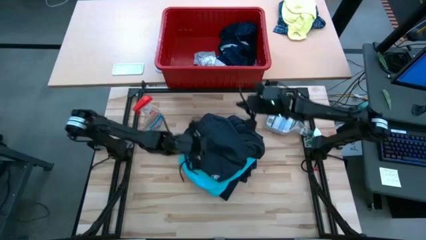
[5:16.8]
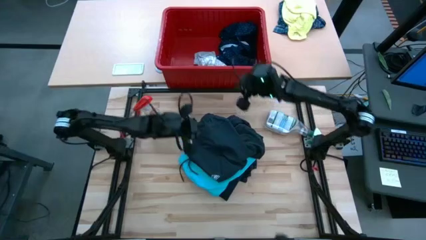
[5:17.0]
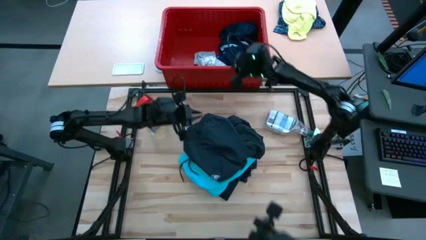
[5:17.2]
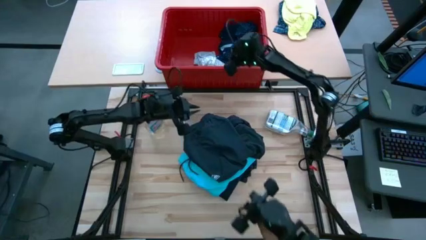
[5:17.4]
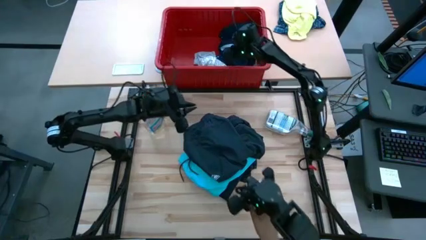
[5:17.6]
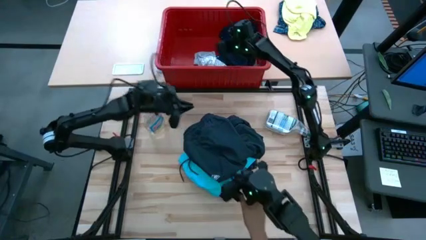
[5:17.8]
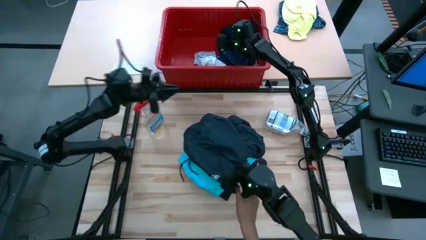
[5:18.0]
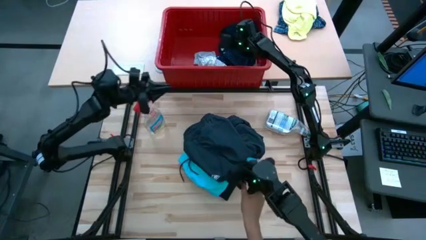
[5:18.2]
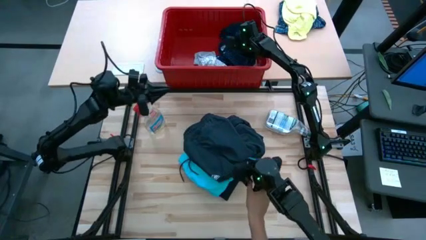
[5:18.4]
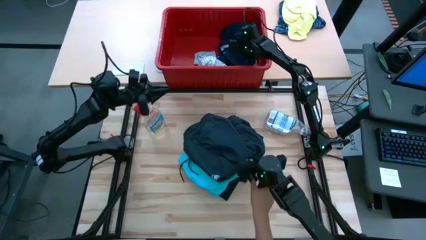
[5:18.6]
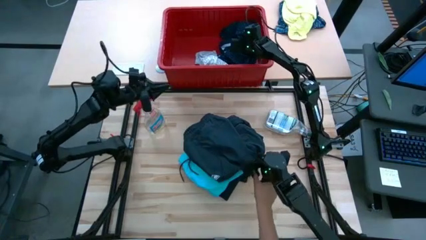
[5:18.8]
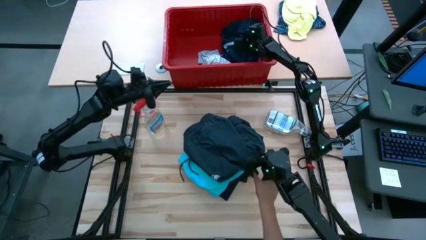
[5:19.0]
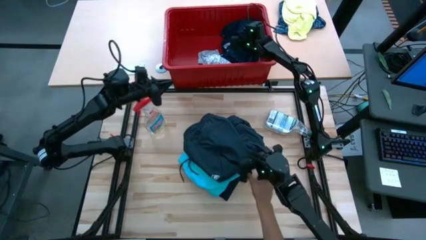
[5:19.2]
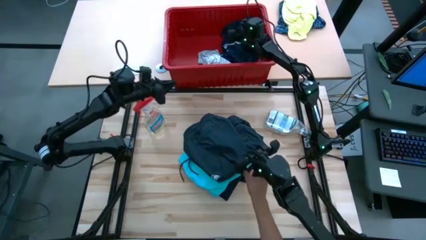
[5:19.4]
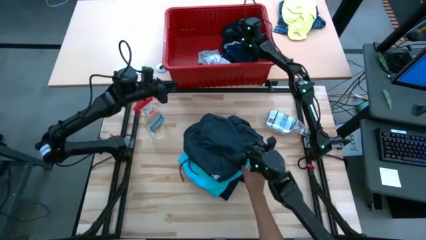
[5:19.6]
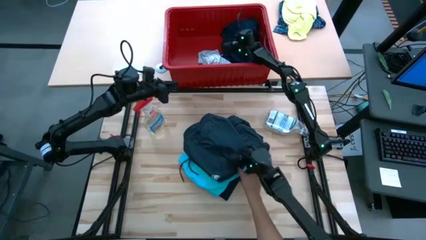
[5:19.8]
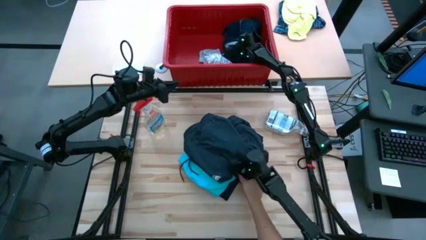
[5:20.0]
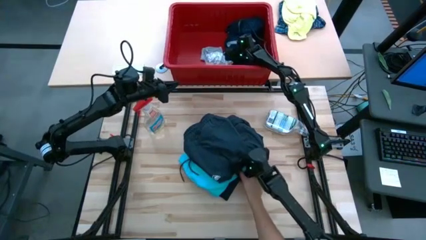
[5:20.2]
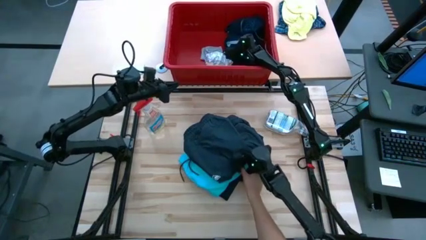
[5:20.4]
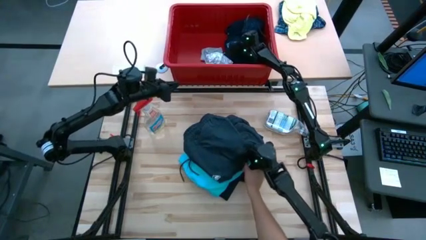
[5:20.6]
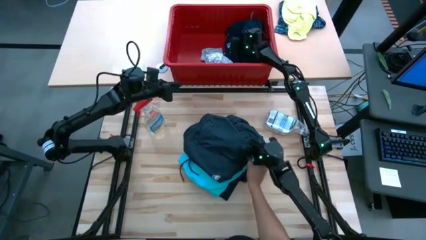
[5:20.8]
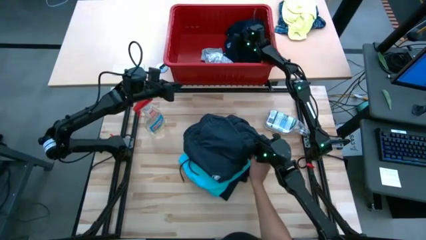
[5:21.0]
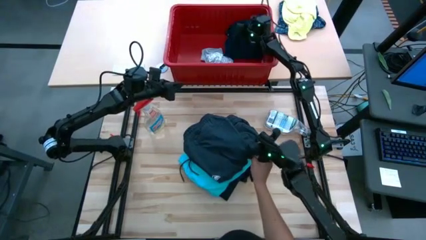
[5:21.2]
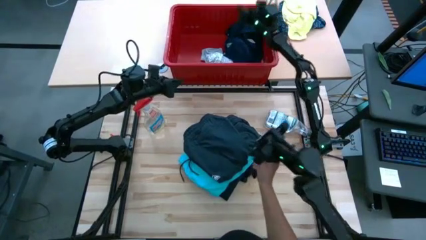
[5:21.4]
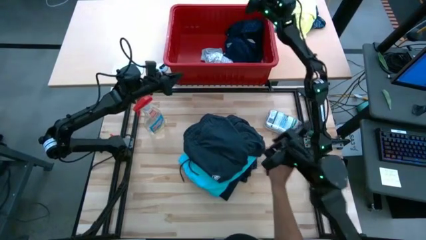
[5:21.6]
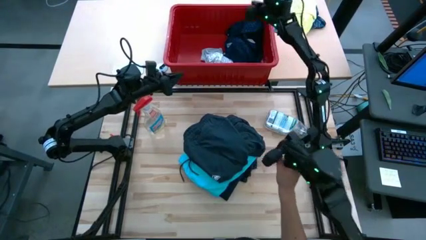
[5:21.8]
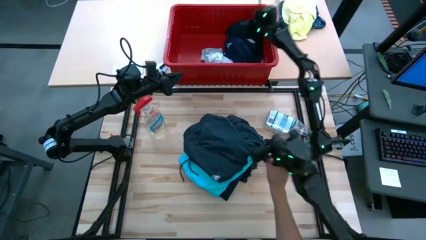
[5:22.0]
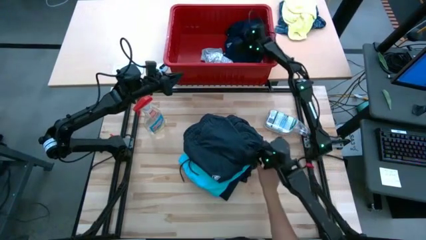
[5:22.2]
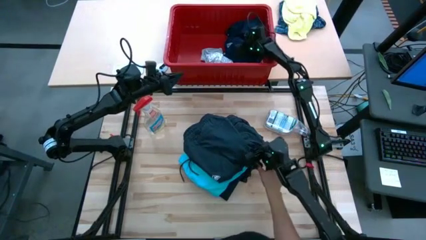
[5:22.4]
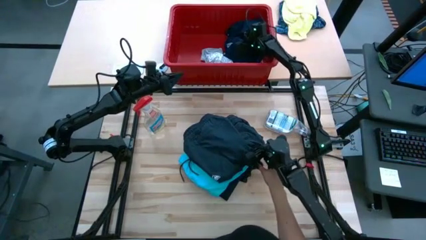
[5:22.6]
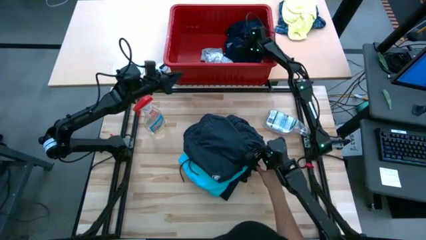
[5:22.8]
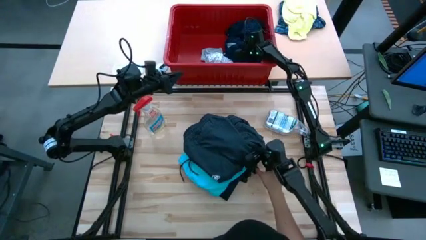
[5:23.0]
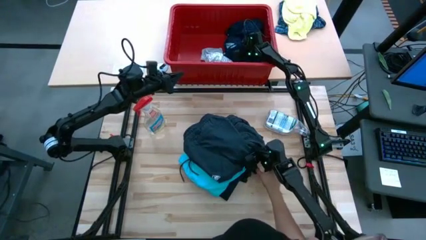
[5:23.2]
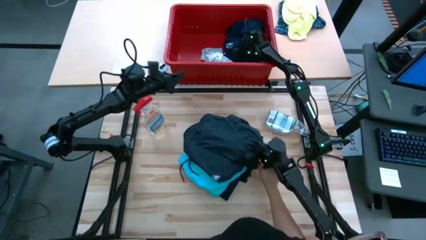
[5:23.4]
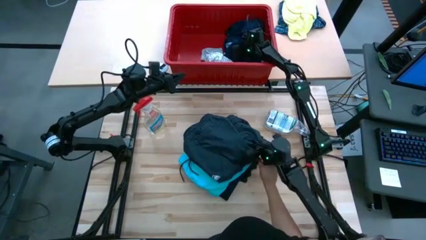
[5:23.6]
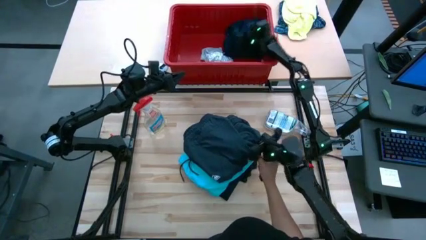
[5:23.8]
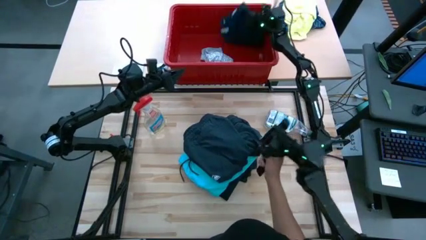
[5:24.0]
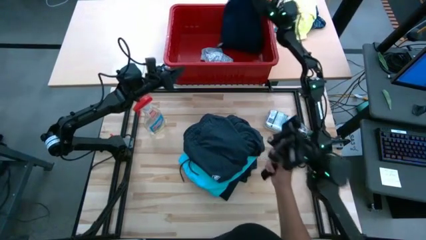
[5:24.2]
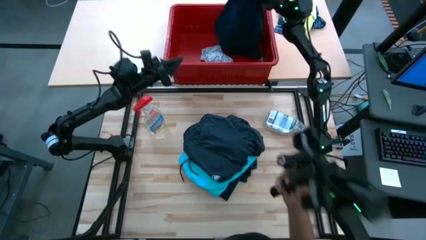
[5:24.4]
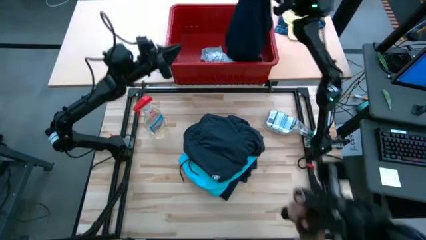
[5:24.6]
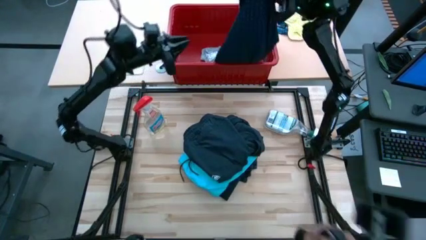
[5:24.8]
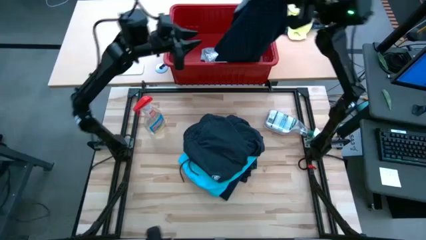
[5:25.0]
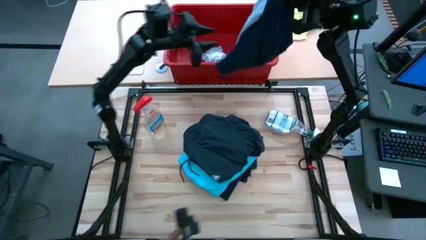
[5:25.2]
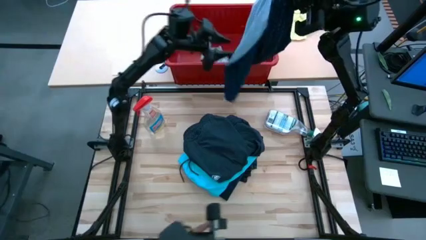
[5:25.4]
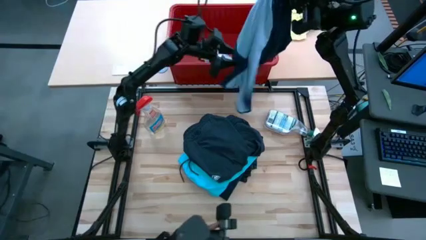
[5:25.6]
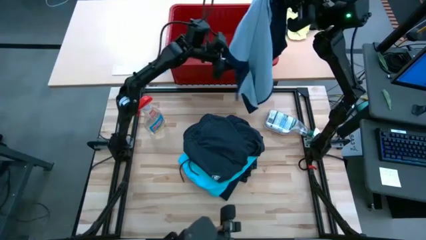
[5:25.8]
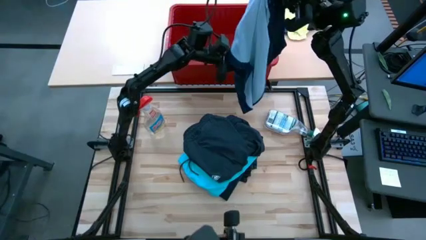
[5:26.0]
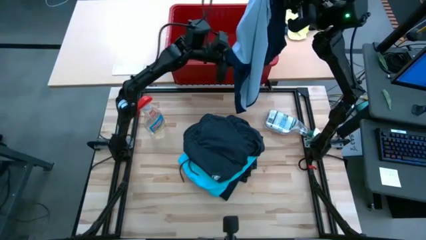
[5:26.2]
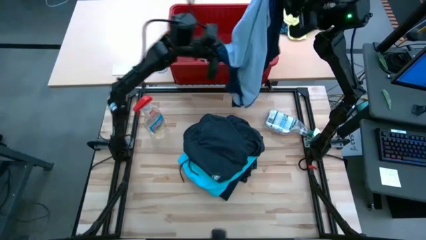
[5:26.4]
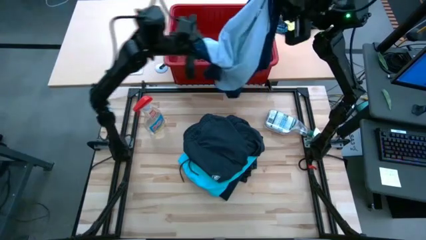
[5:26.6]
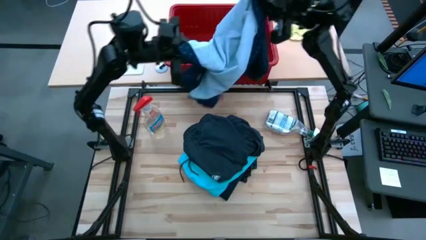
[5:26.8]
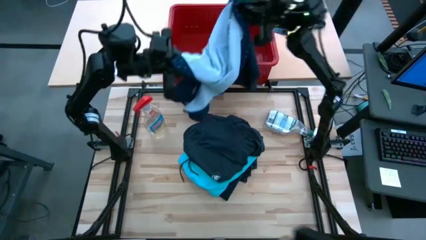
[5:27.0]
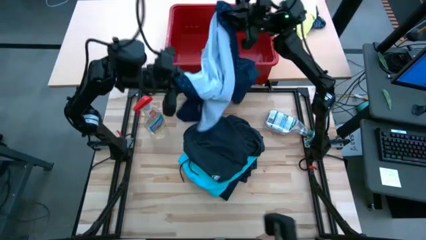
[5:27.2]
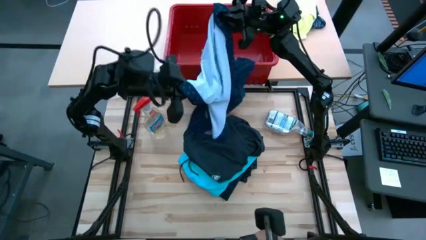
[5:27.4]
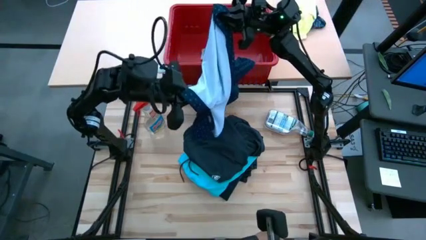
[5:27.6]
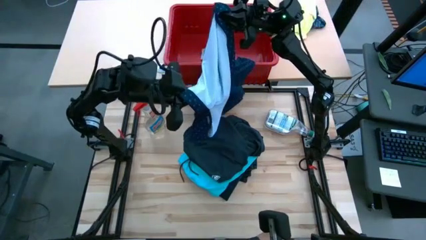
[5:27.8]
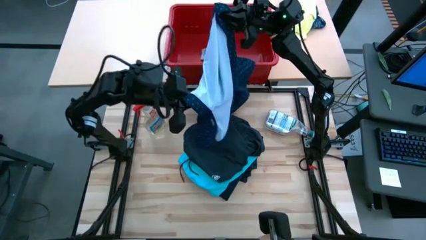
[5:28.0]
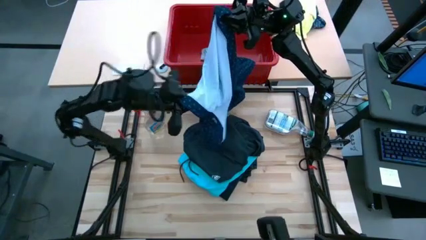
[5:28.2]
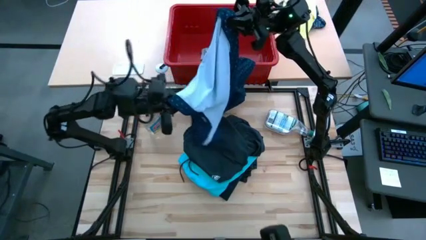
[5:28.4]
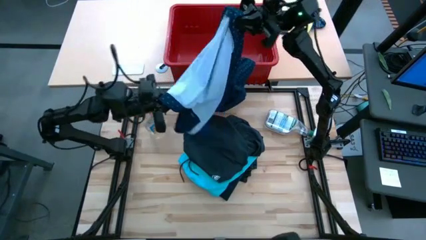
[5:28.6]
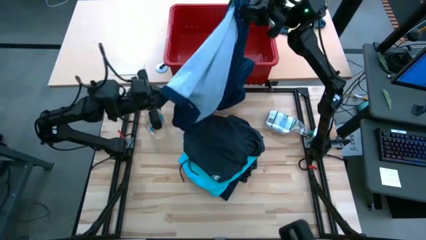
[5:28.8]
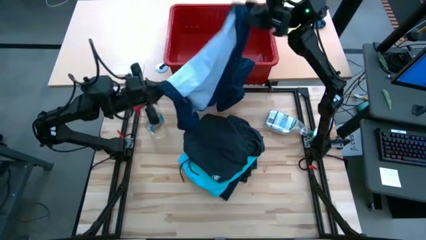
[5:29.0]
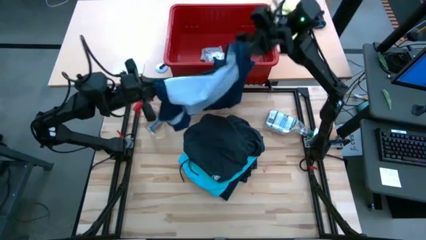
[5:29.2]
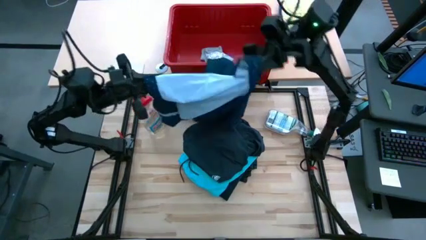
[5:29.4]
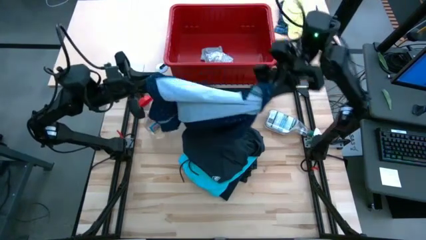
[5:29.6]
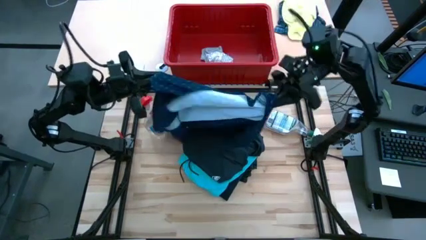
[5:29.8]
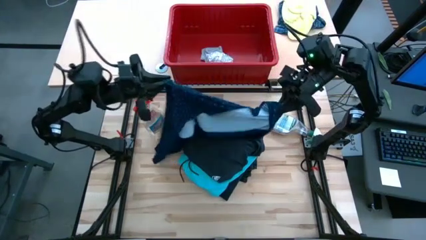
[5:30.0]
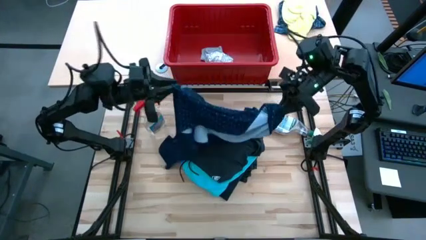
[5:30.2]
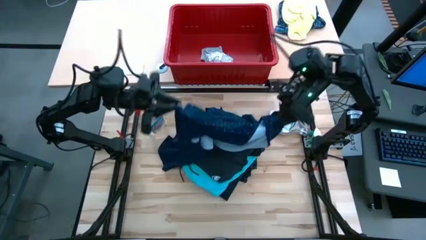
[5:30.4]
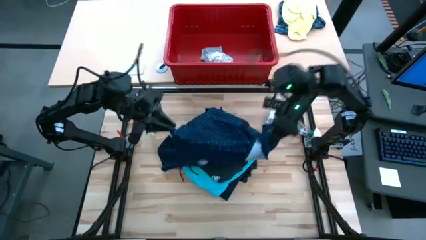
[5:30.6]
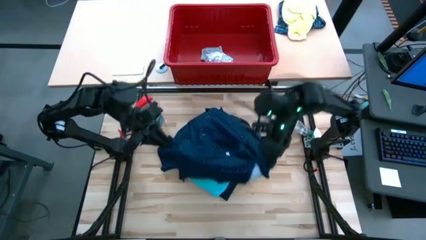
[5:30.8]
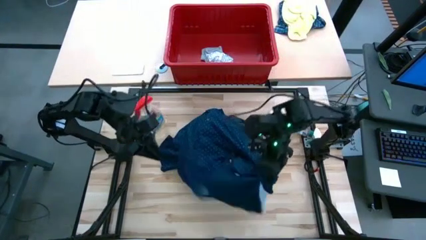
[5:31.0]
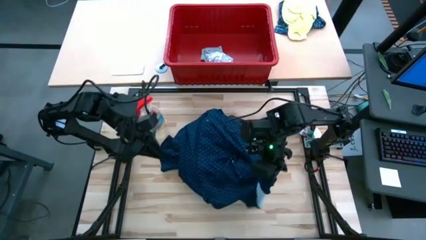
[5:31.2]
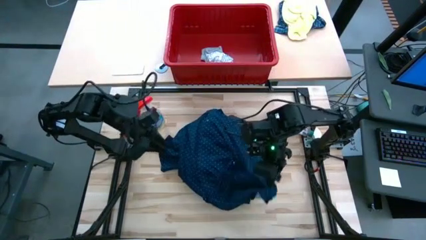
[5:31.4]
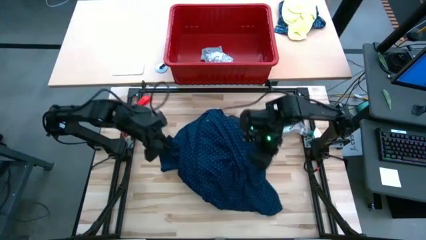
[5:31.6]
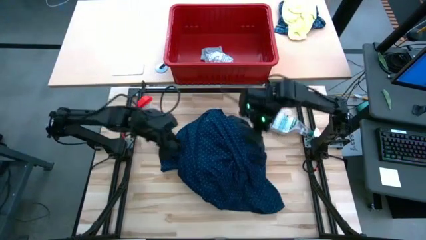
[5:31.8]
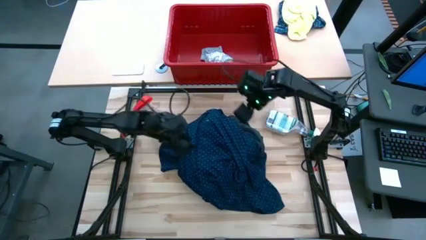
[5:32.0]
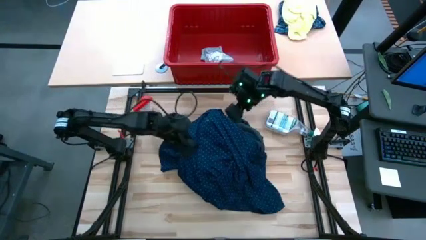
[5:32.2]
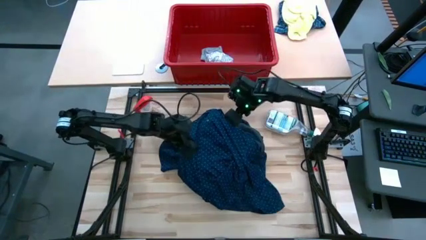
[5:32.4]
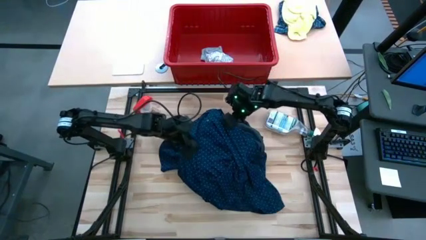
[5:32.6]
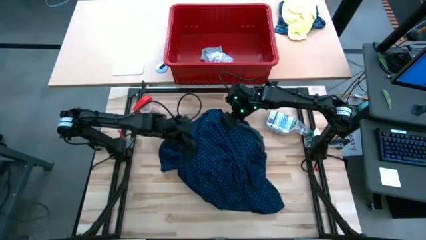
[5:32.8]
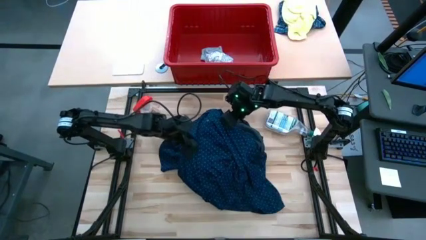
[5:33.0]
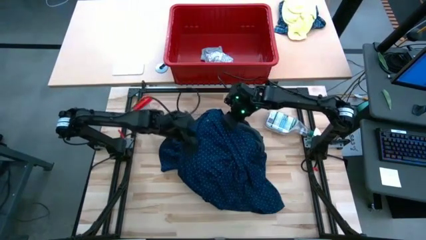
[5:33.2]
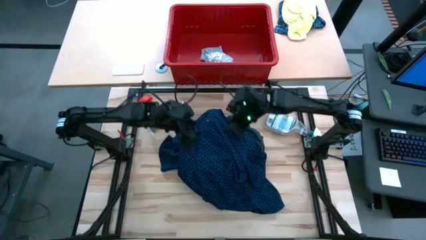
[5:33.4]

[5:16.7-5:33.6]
Task: Fold Laundry from Bin
Fold the blue polo shirt
